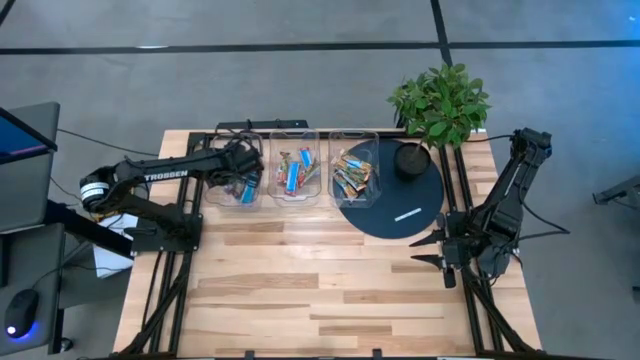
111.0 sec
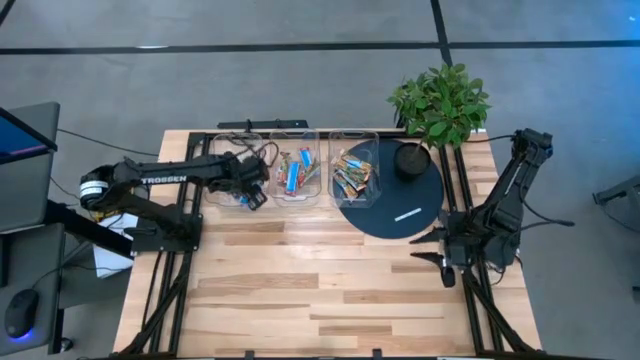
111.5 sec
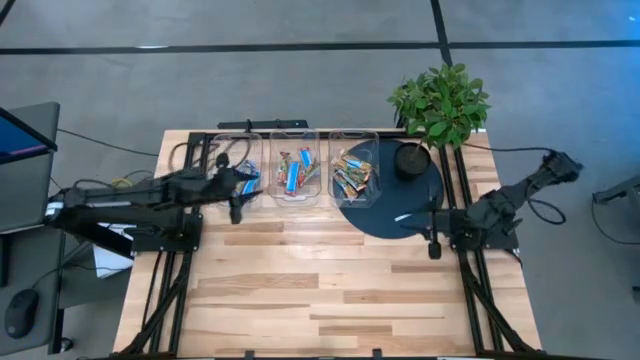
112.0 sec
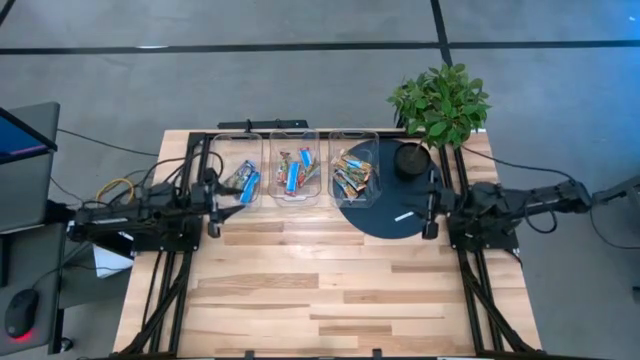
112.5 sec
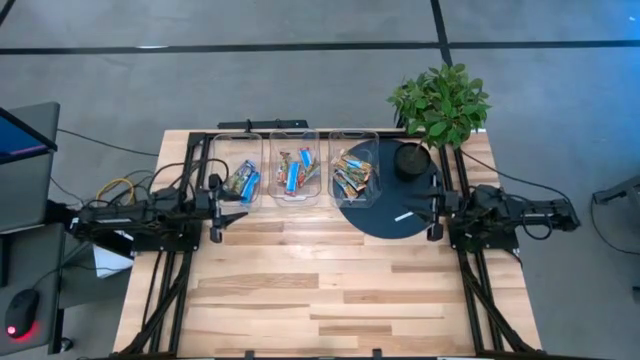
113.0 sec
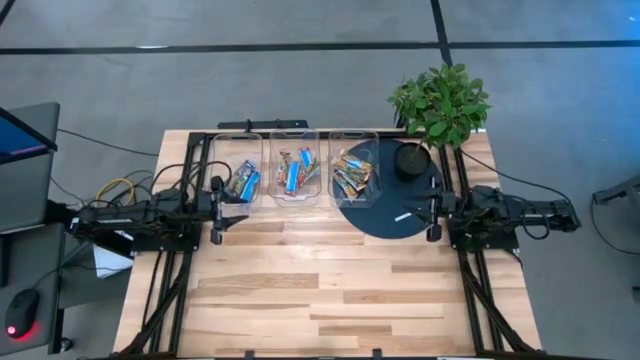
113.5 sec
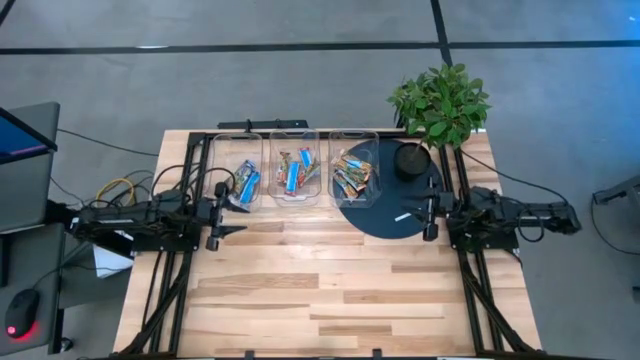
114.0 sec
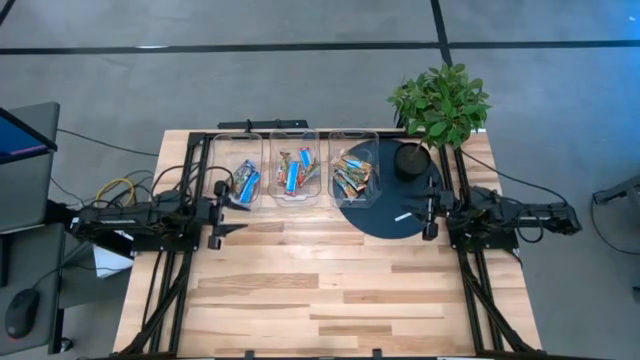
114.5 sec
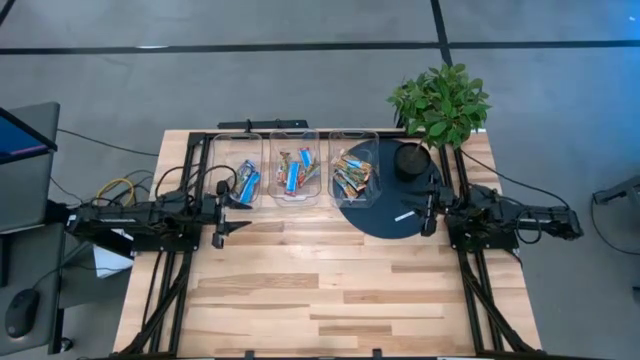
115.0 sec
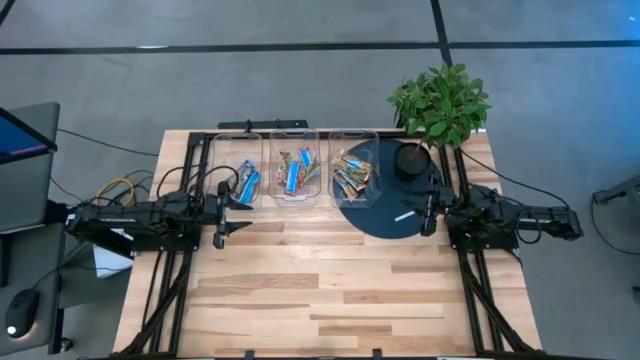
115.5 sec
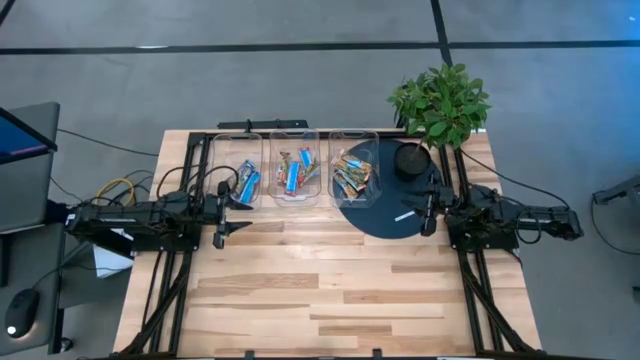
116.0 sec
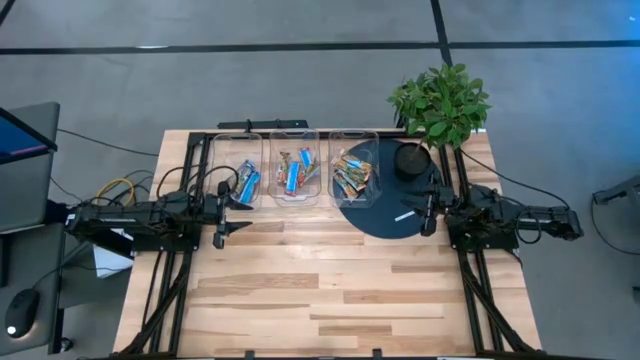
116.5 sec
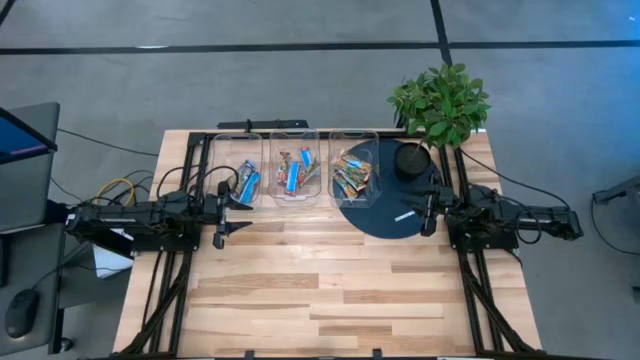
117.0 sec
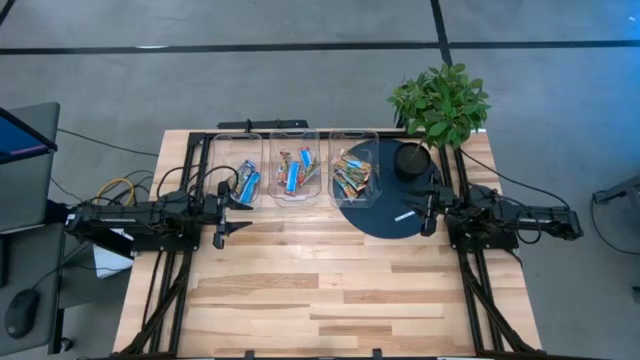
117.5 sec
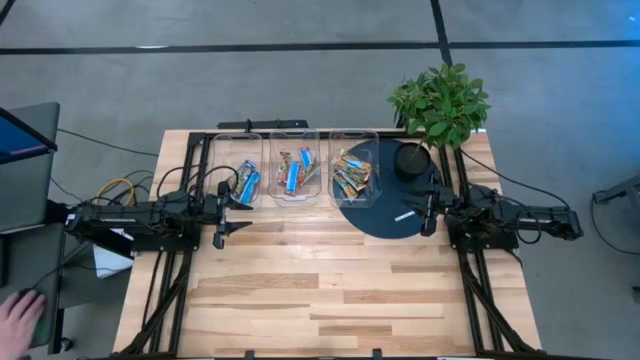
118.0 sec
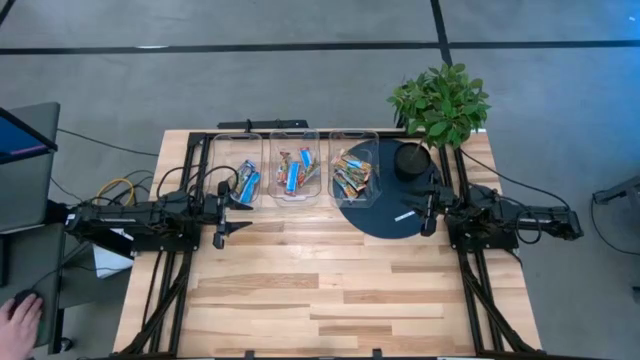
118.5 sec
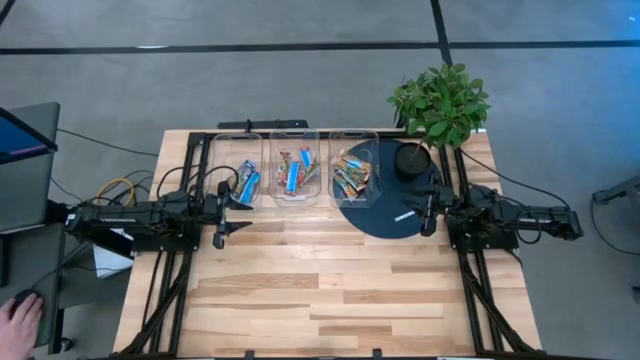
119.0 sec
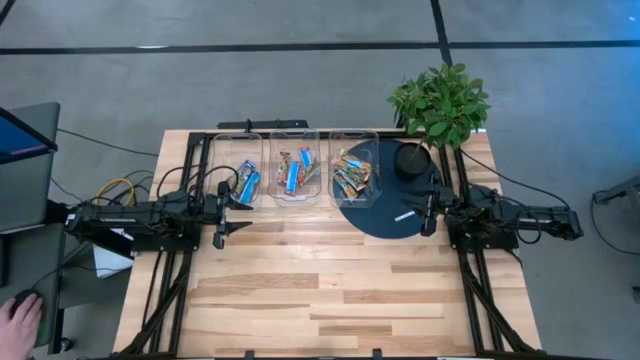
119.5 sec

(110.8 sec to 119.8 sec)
Task: Pick and place Granola Bars by type
Return to Home Position

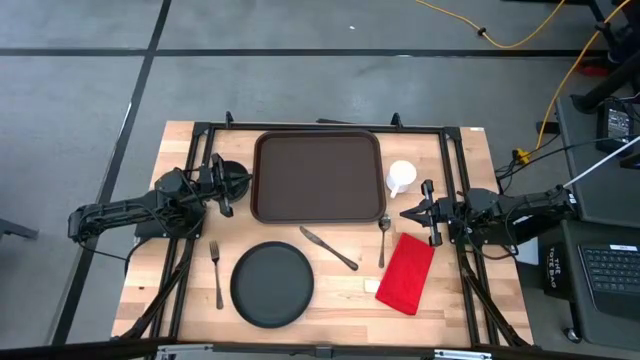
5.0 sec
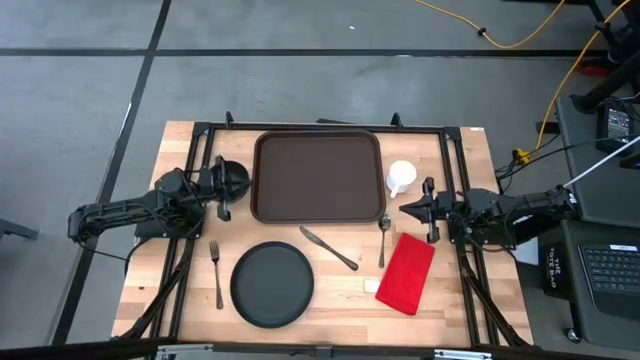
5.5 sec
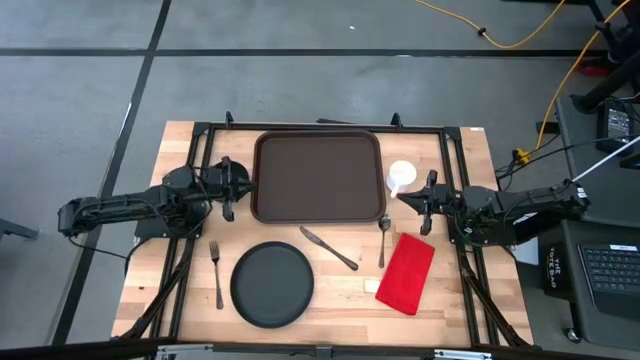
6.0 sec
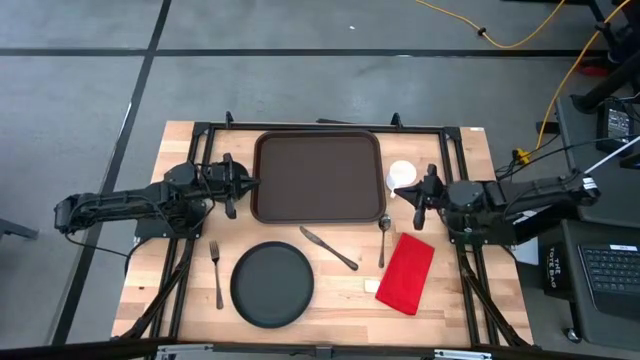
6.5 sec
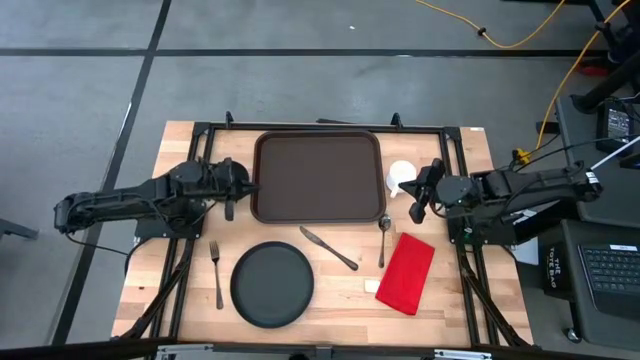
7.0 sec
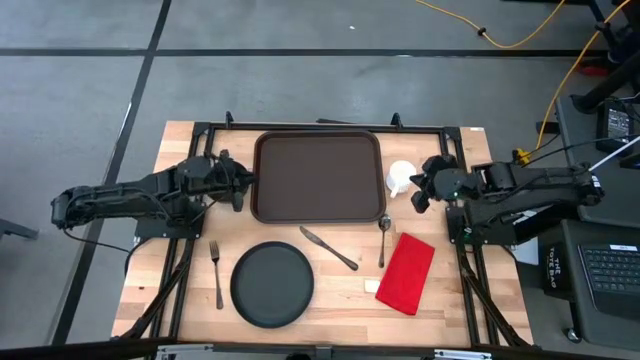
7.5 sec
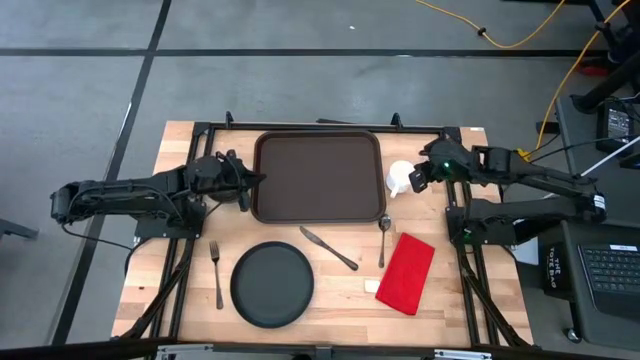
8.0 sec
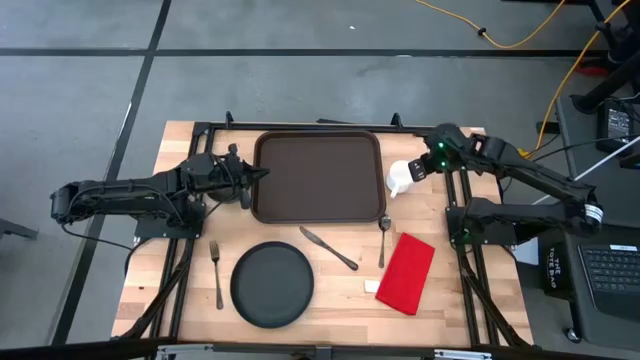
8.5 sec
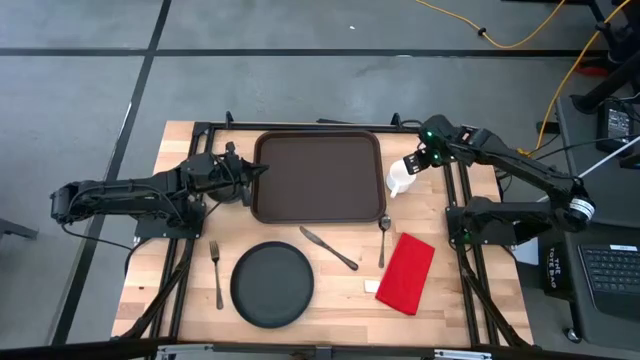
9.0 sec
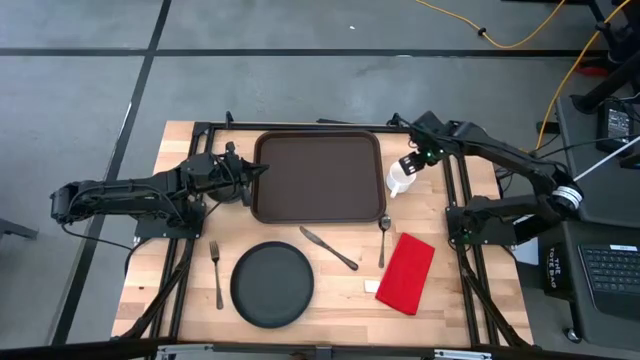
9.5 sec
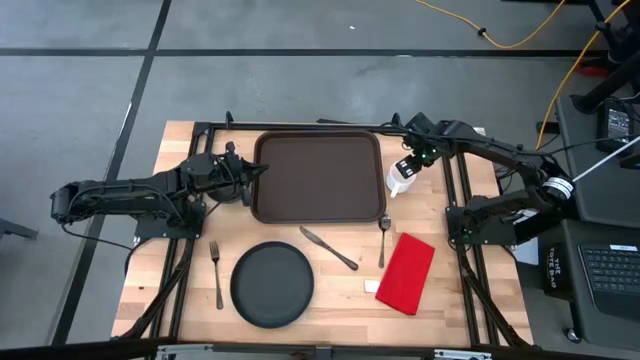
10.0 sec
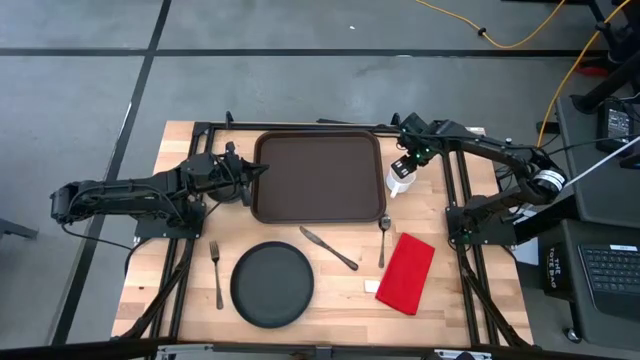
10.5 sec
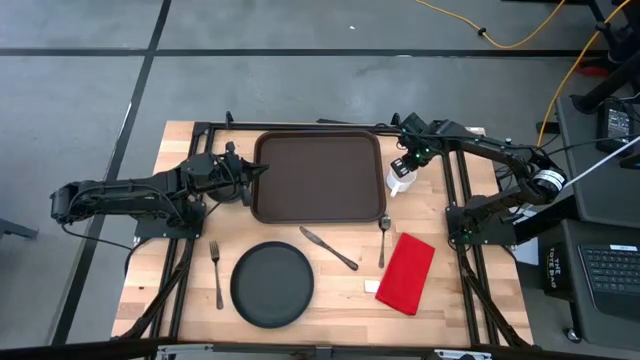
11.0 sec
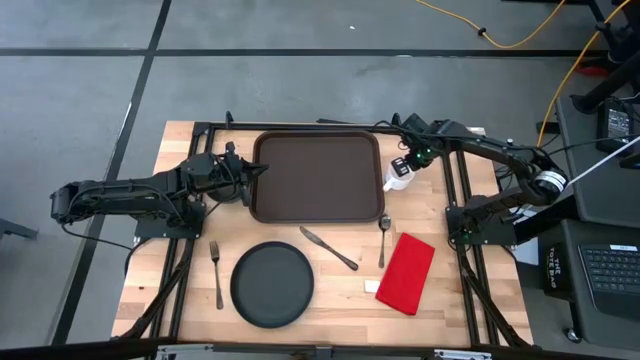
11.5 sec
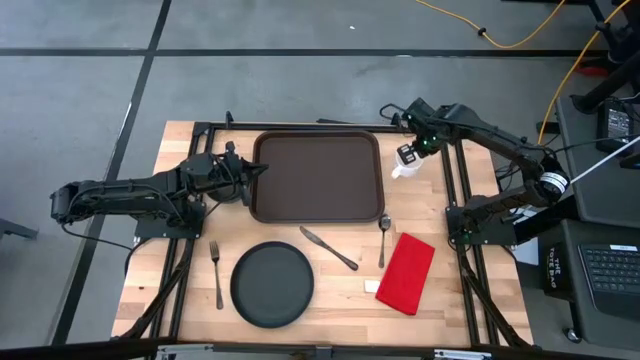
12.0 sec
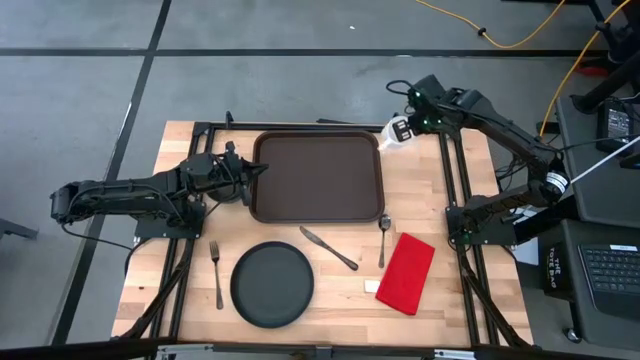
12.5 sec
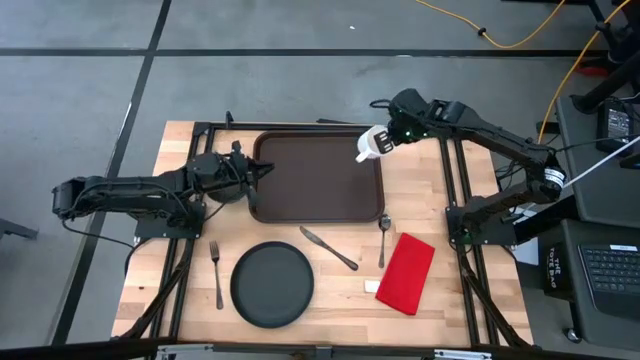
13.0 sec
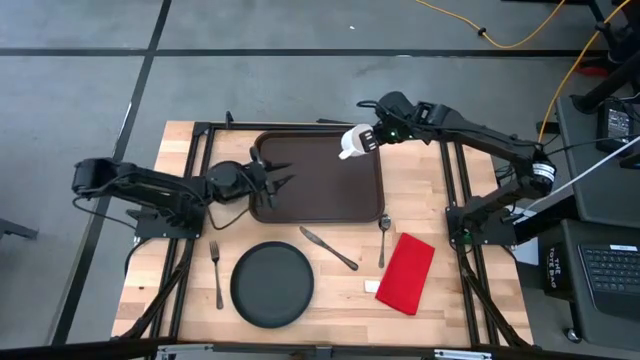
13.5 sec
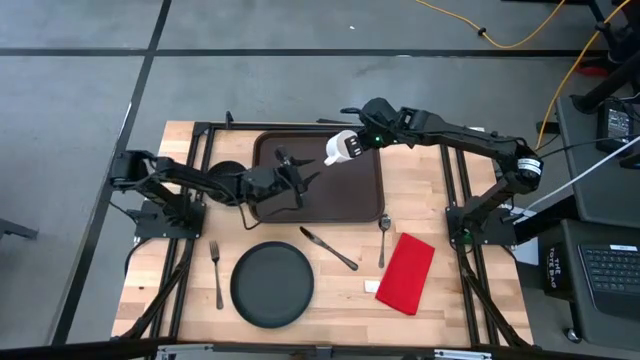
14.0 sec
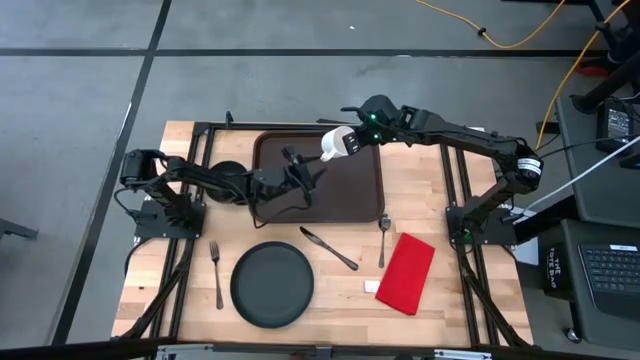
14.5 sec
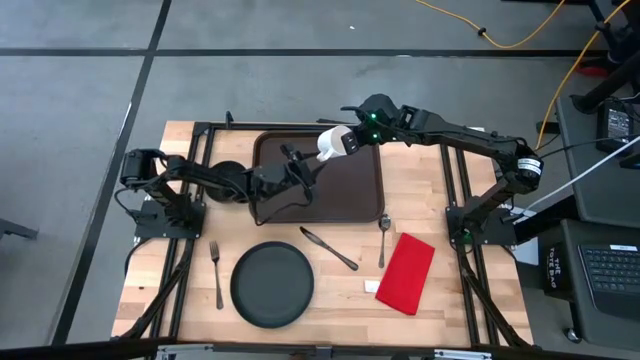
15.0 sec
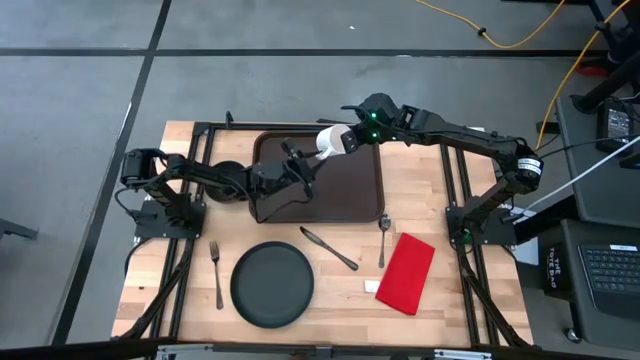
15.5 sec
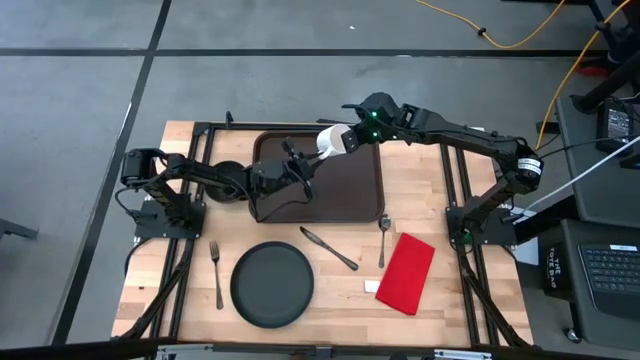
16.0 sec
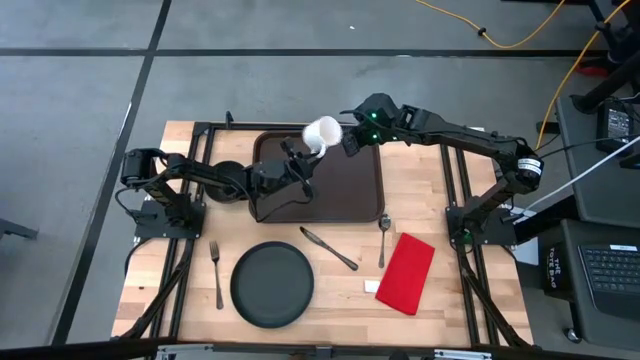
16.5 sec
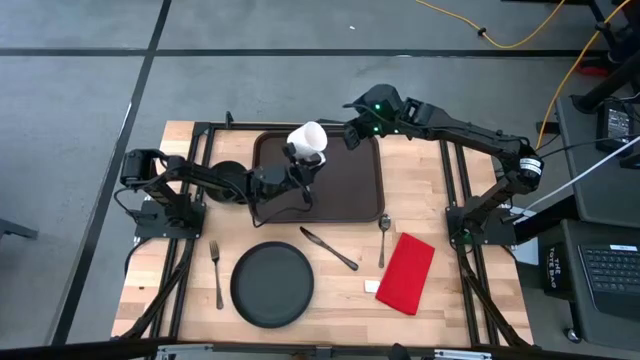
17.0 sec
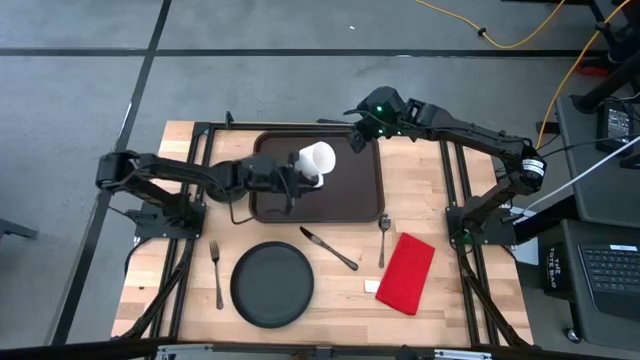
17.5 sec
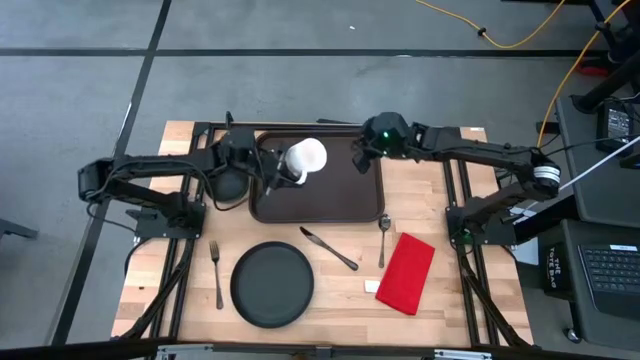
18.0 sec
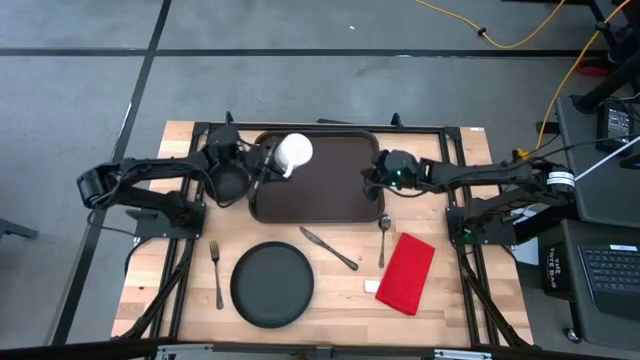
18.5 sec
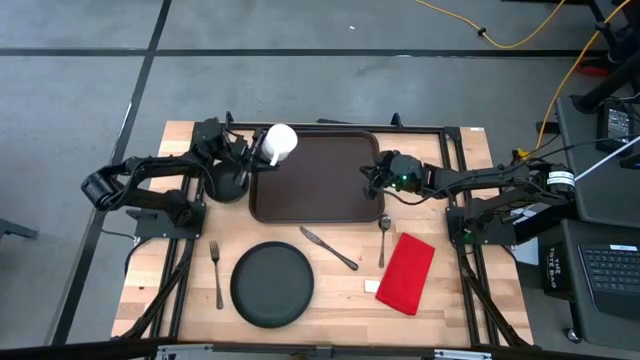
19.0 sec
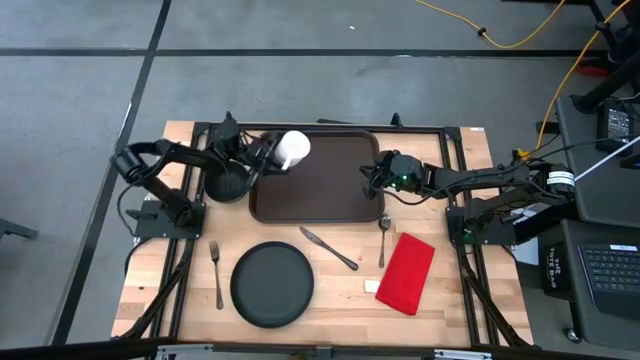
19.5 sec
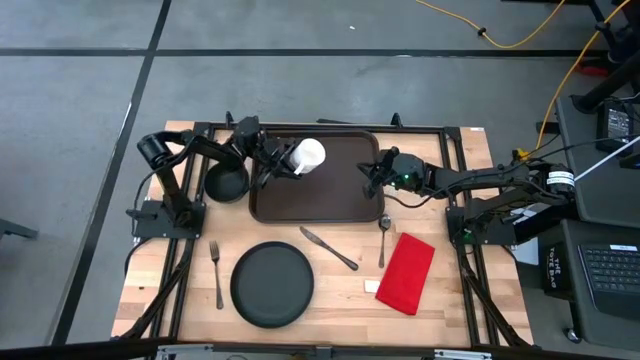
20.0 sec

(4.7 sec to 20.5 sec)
Task: Set up tray
Put the white mug on the brown serving tray
